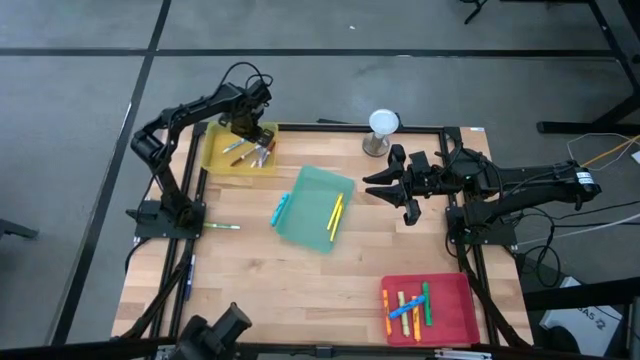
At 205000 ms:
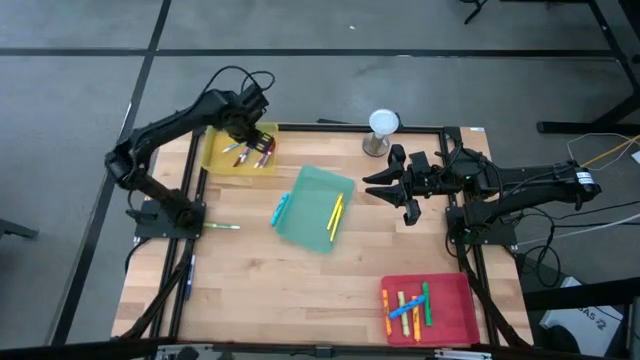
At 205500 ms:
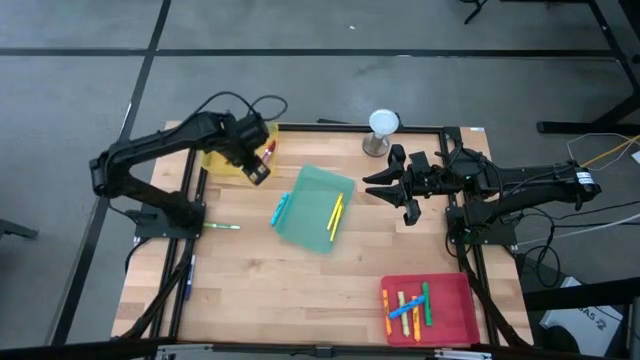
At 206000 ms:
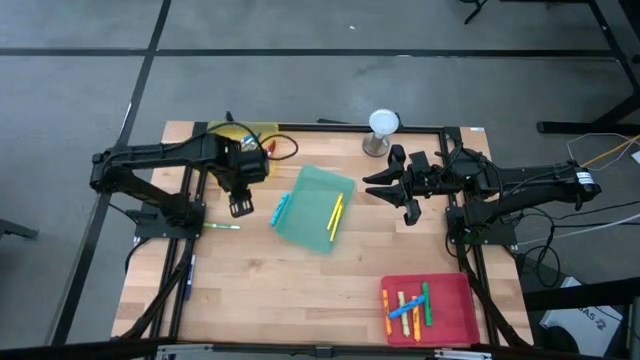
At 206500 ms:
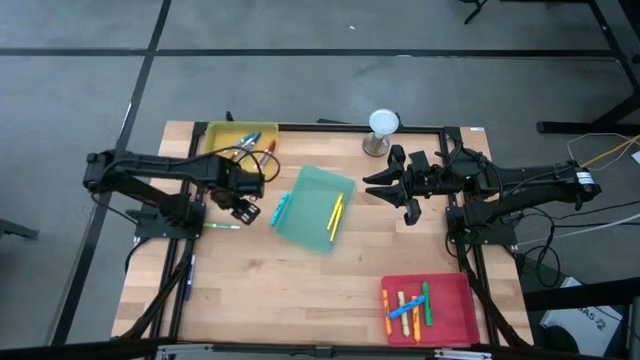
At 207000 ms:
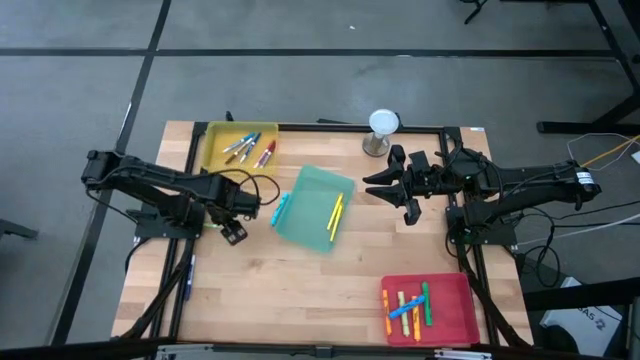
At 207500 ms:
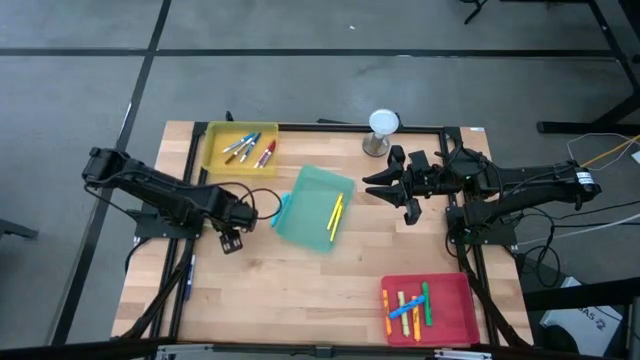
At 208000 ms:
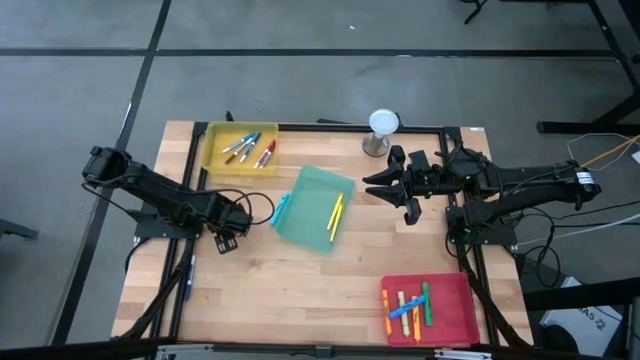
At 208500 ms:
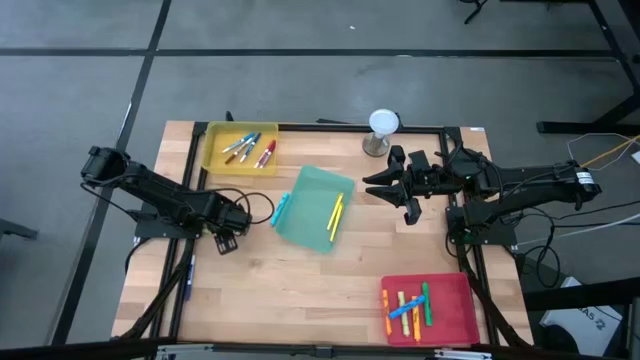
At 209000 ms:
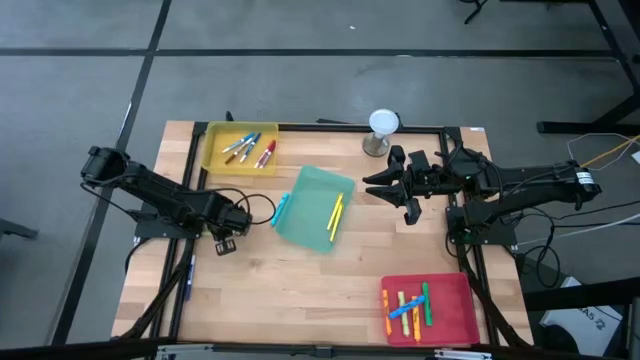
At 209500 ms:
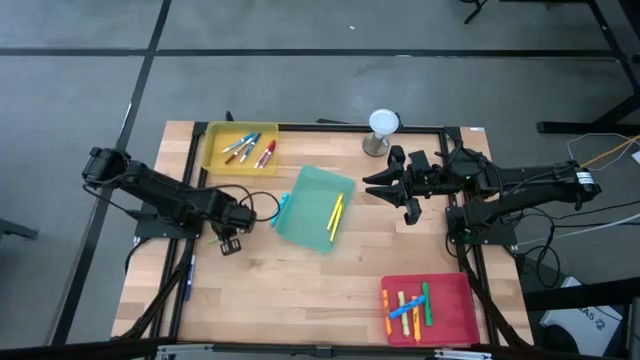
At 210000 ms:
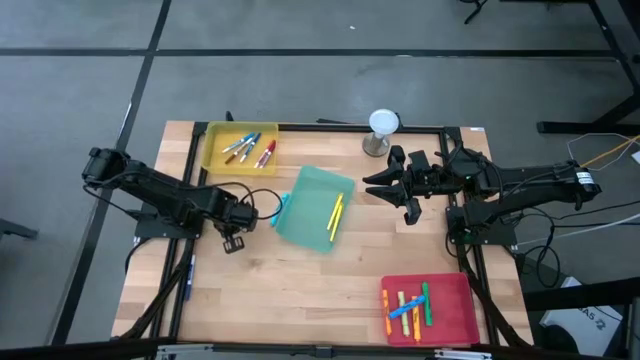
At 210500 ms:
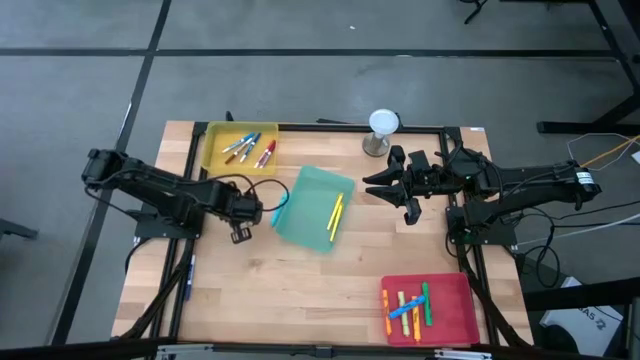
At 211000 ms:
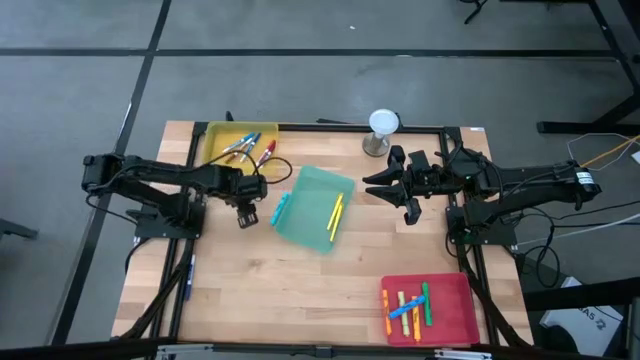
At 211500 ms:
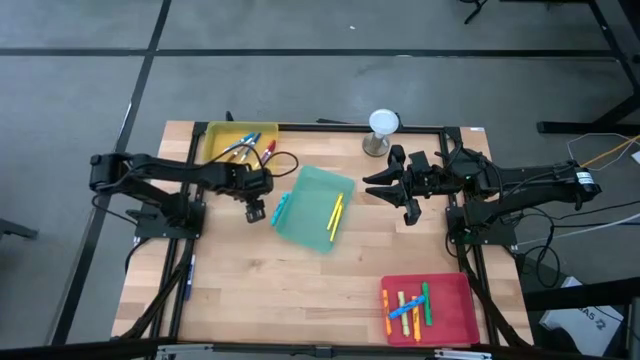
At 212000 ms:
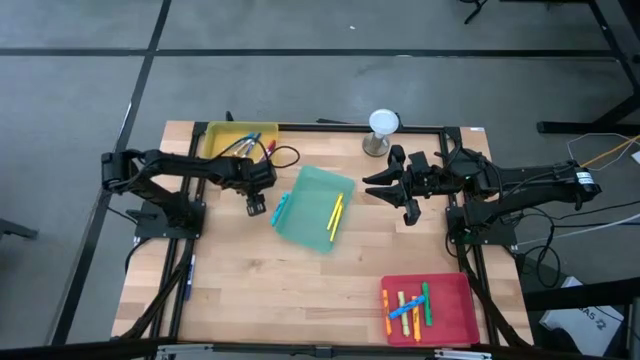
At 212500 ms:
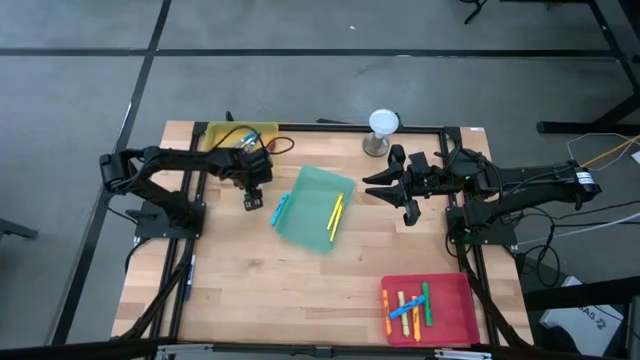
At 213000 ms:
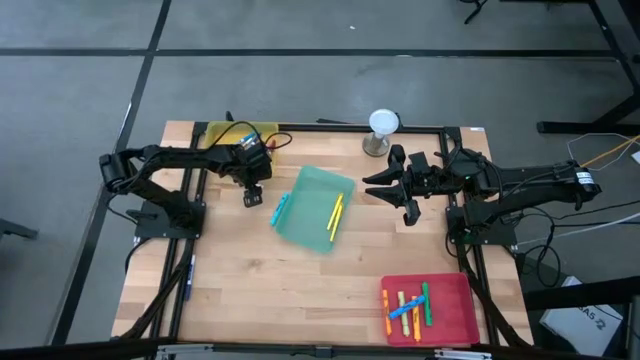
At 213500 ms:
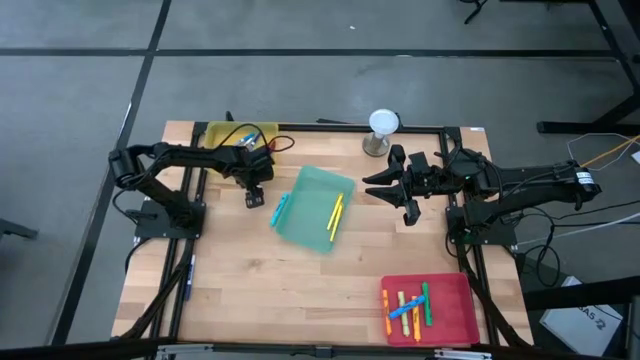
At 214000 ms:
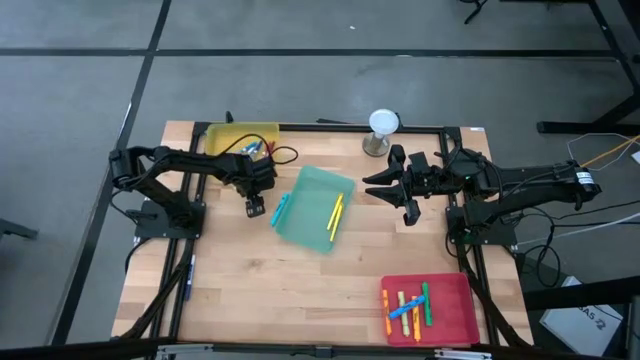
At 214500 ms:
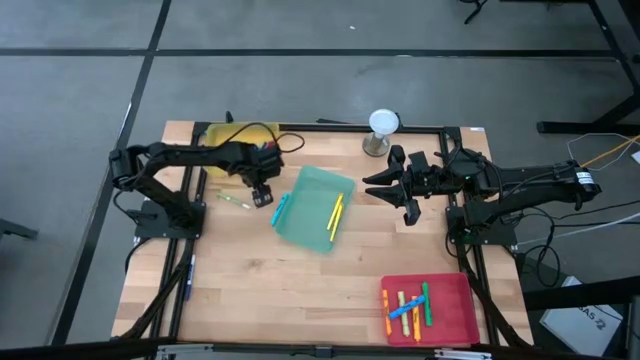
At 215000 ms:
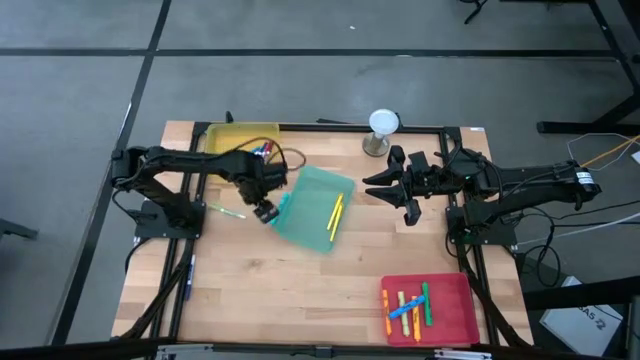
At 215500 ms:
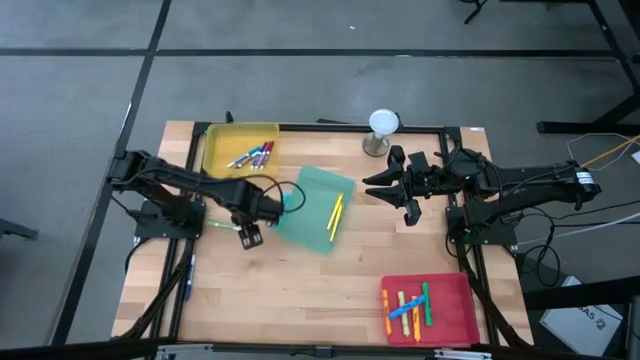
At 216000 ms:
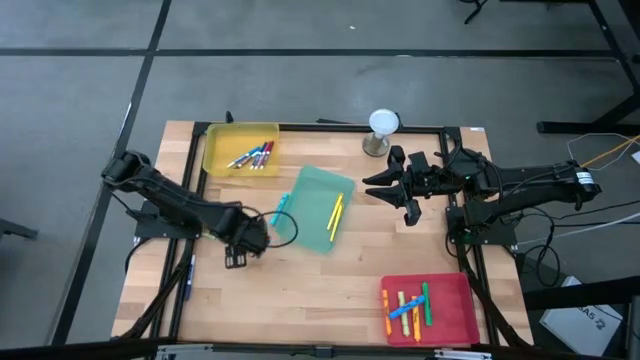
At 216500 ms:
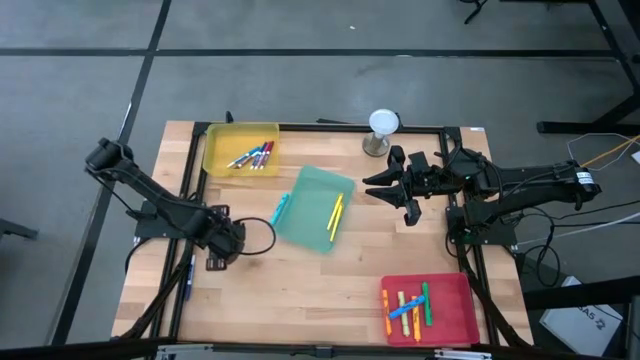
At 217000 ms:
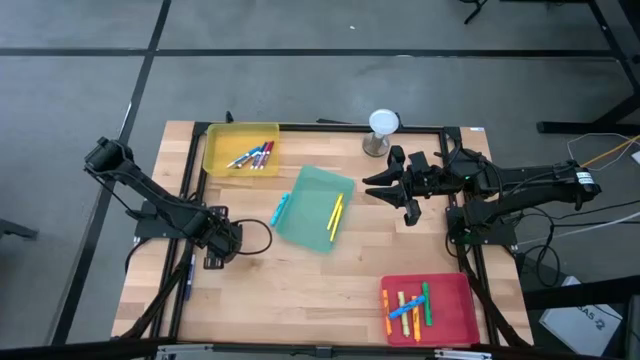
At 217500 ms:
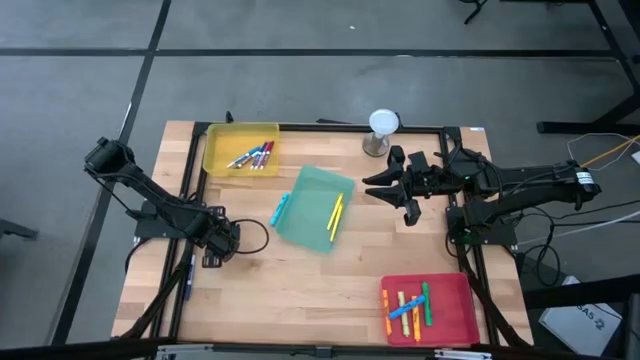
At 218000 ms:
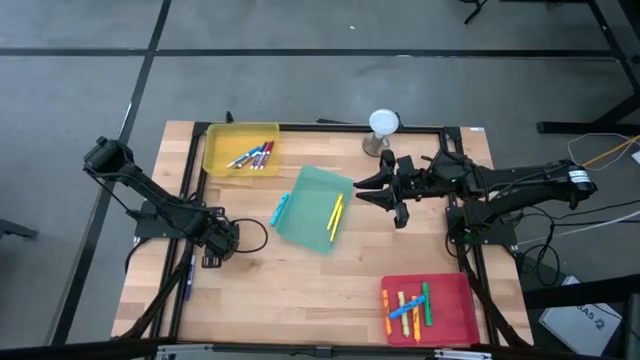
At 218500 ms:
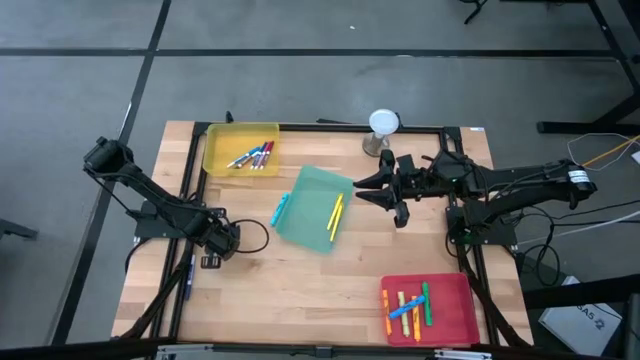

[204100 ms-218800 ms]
Task: Pick & Place Markers
Put the green marker pen into the yellow bin

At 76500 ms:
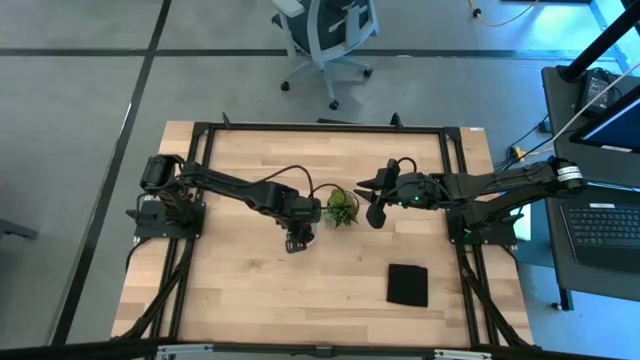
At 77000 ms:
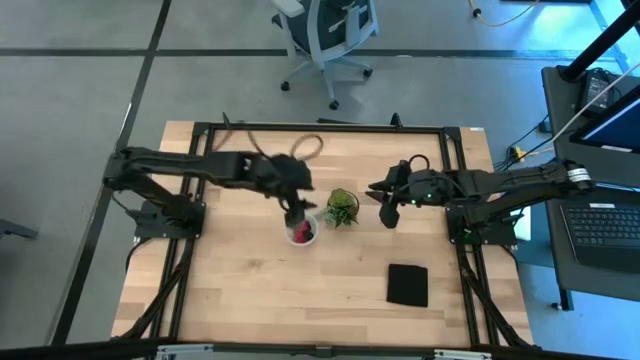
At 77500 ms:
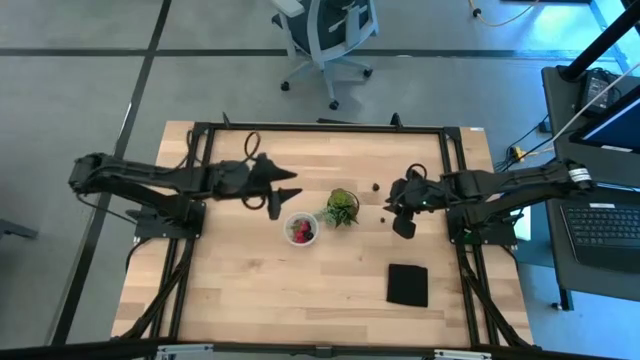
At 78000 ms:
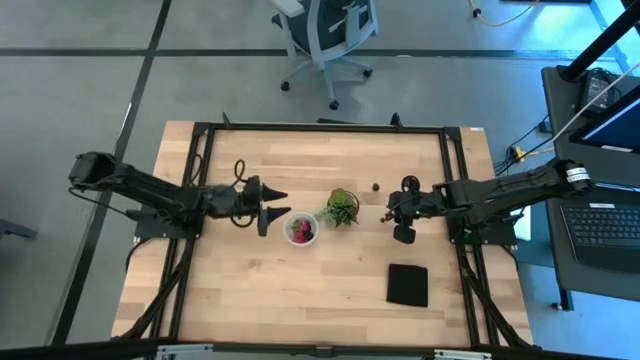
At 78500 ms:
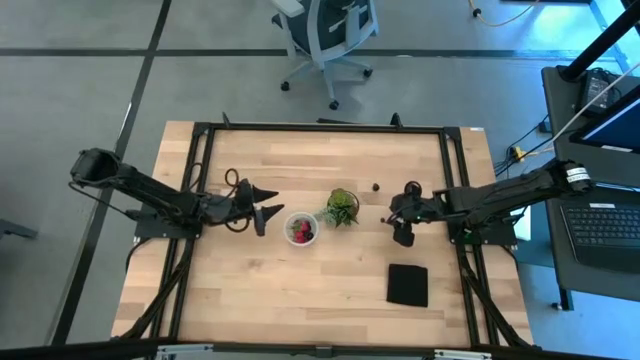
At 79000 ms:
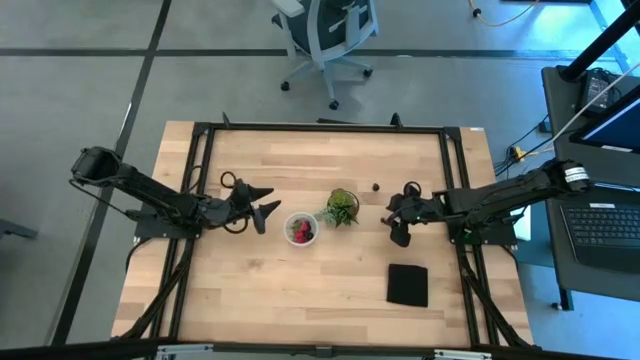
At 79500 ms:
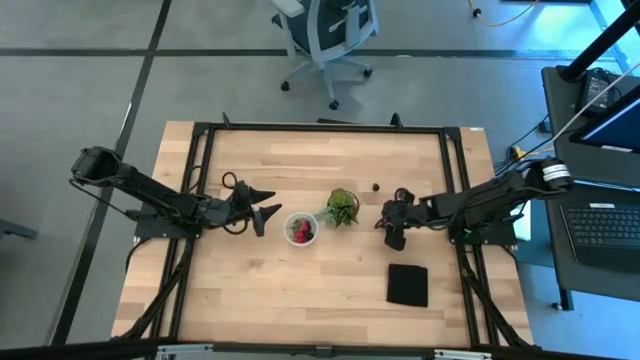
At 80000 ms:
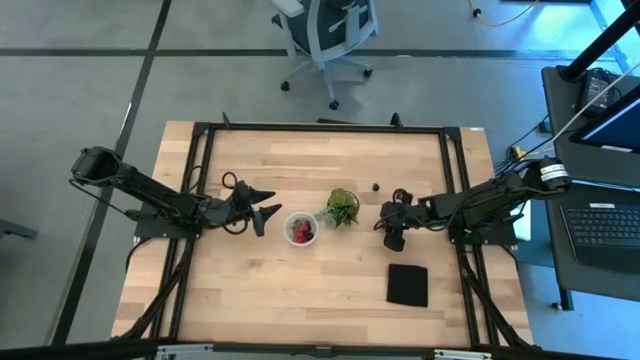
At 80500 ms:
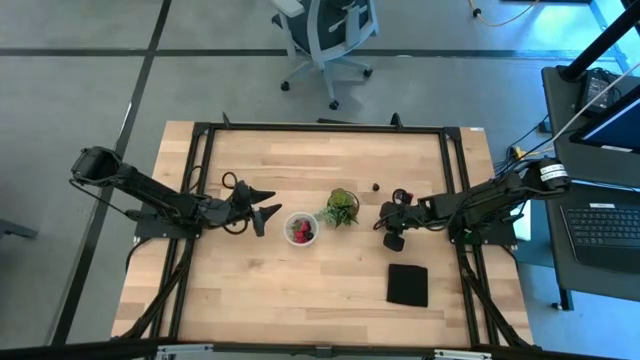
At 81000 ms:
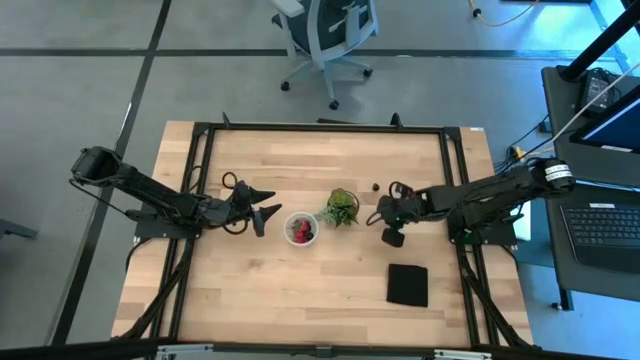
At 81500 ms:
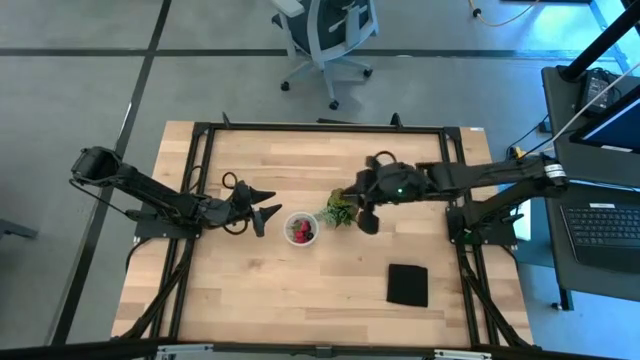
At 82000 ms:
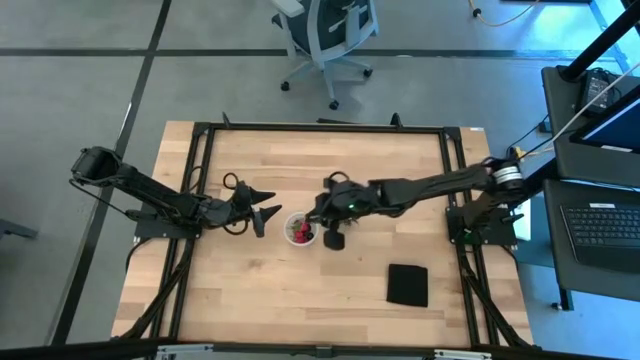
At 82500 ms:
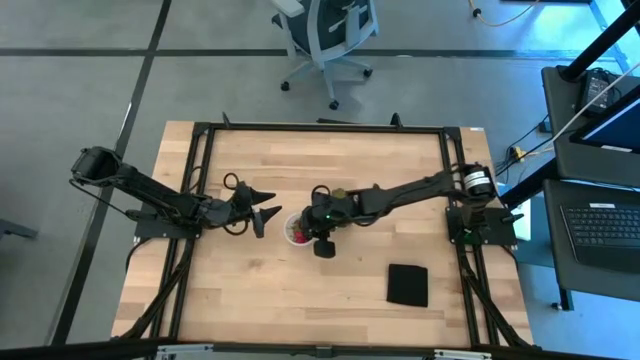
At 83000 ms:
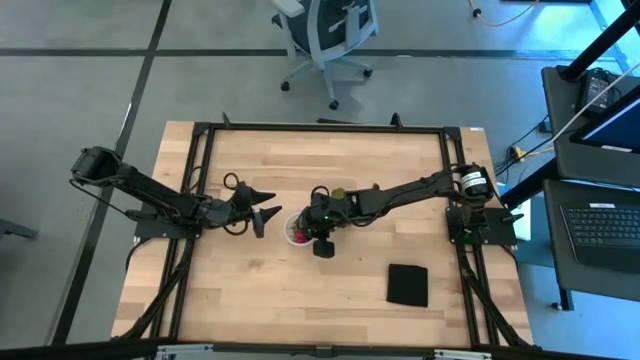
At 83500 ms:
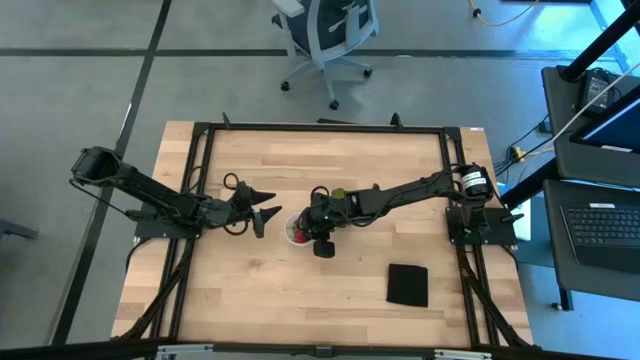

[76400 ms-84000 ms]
Task: Pick and placing Produce into tupperware
Put the blueberry into the transparent container
